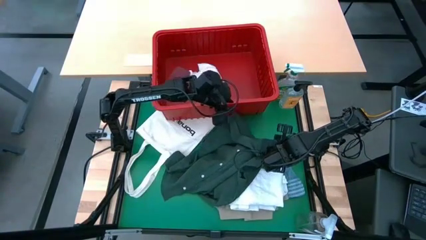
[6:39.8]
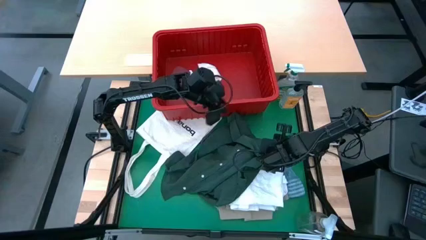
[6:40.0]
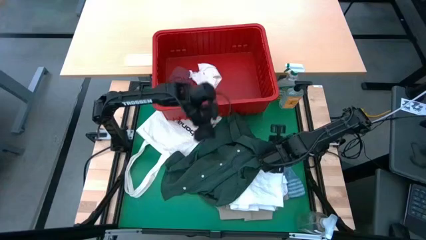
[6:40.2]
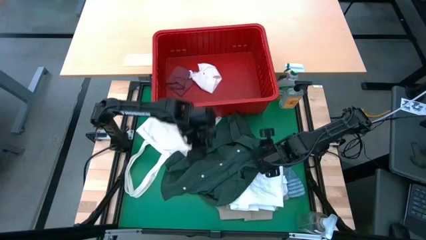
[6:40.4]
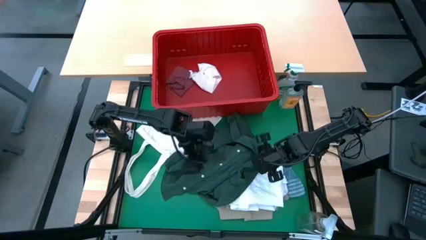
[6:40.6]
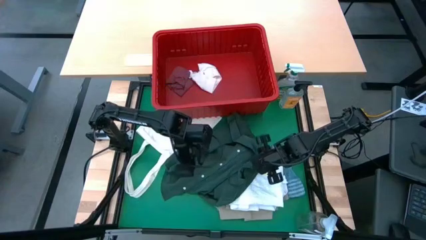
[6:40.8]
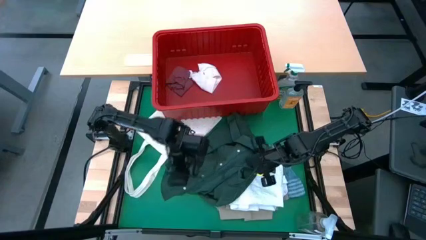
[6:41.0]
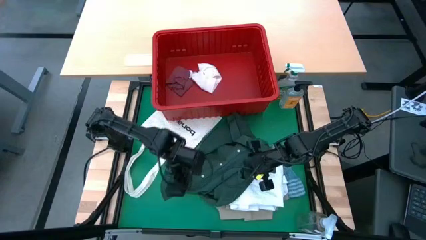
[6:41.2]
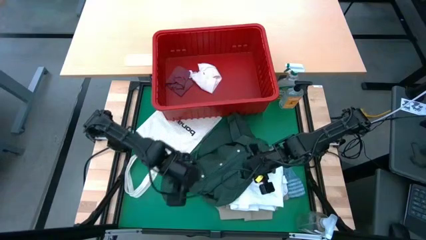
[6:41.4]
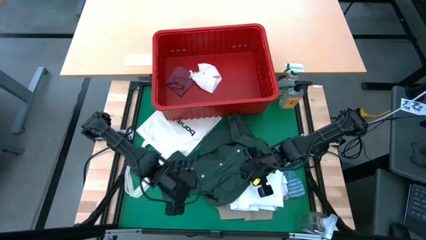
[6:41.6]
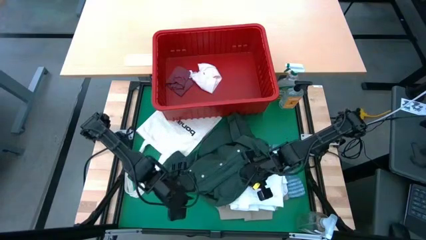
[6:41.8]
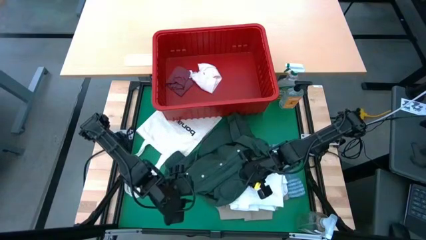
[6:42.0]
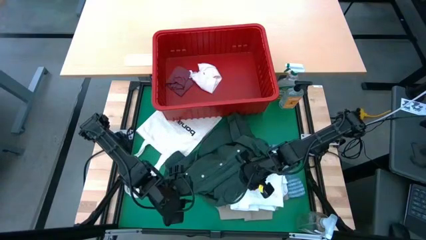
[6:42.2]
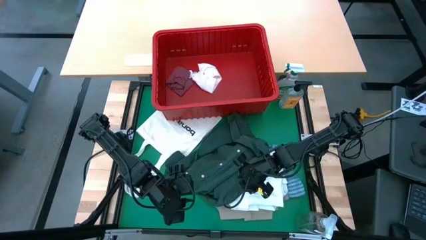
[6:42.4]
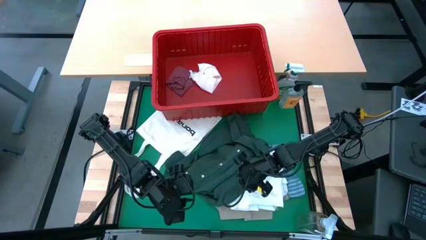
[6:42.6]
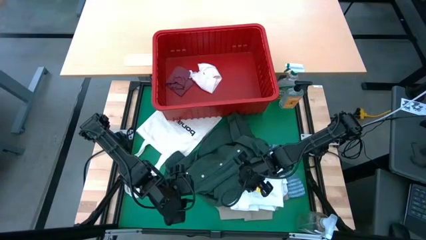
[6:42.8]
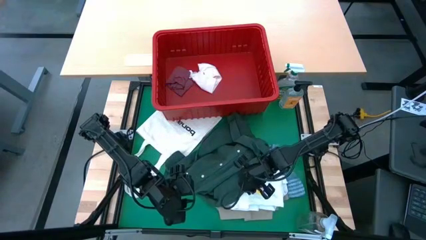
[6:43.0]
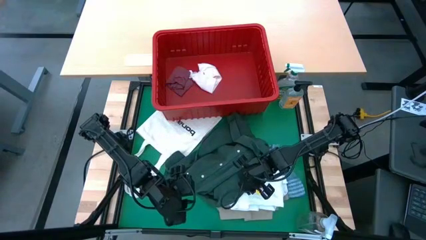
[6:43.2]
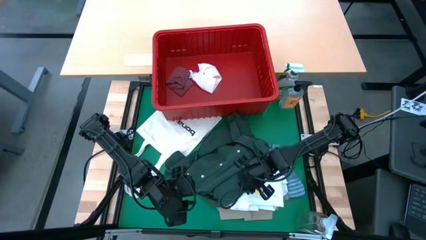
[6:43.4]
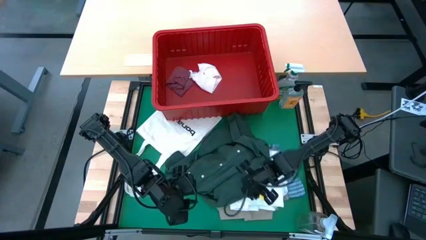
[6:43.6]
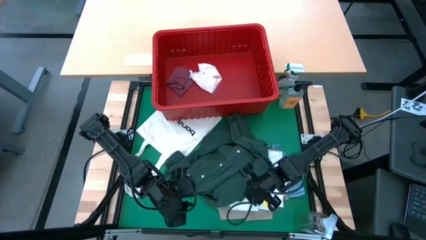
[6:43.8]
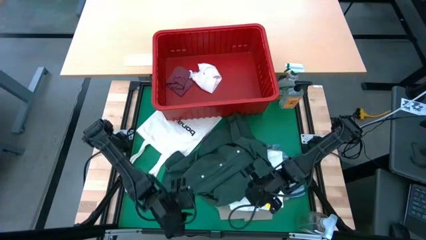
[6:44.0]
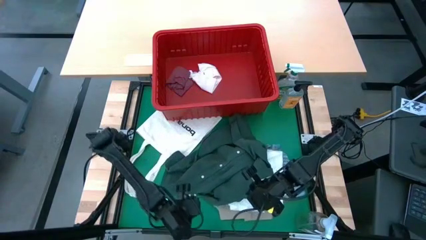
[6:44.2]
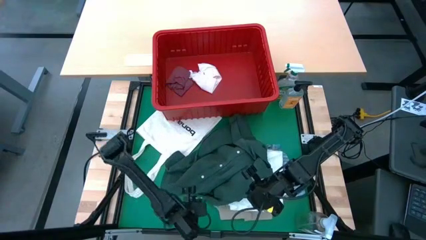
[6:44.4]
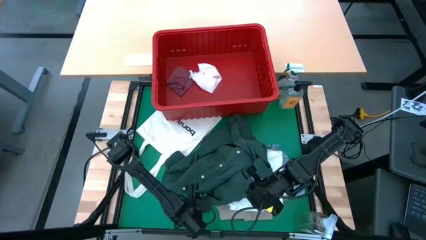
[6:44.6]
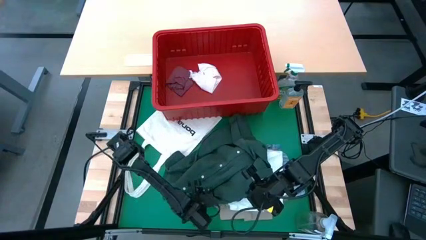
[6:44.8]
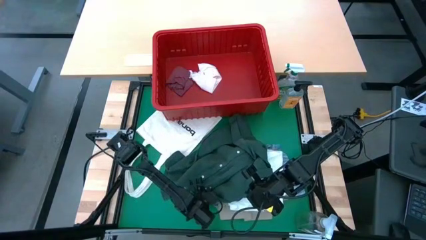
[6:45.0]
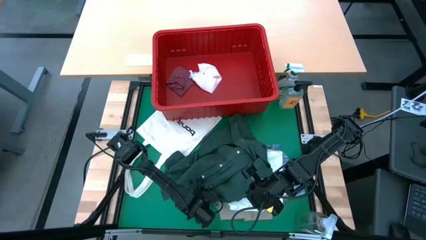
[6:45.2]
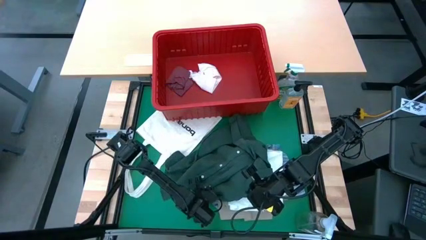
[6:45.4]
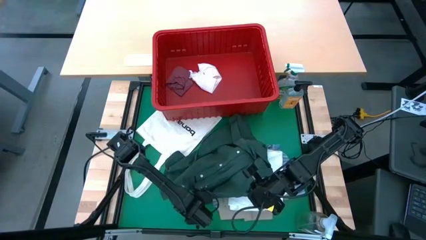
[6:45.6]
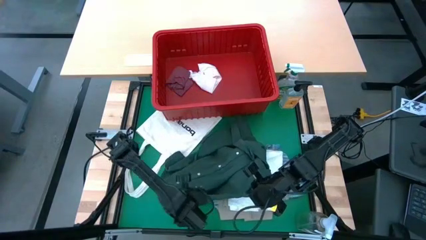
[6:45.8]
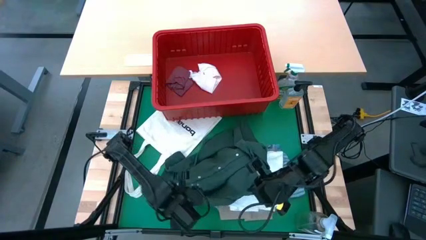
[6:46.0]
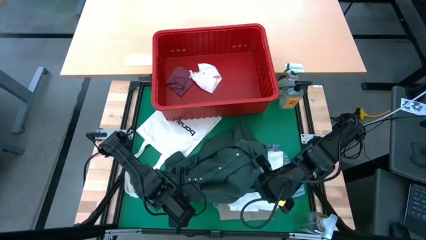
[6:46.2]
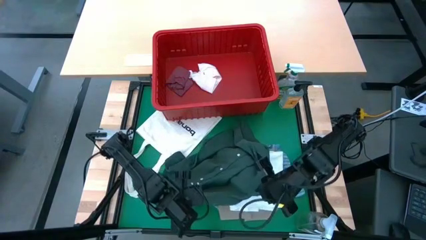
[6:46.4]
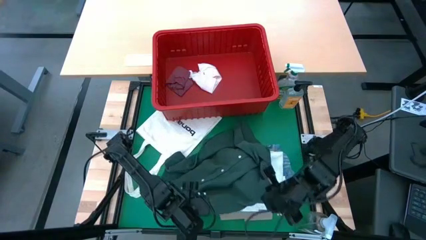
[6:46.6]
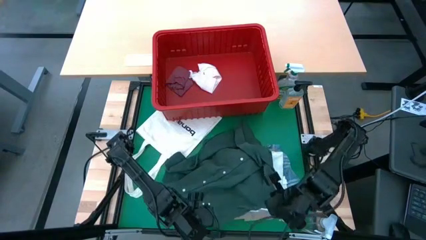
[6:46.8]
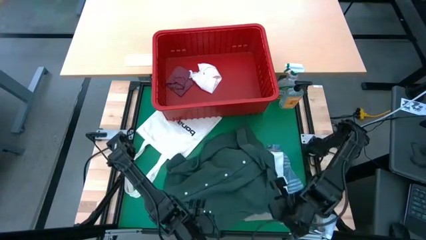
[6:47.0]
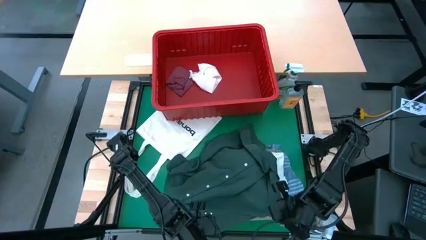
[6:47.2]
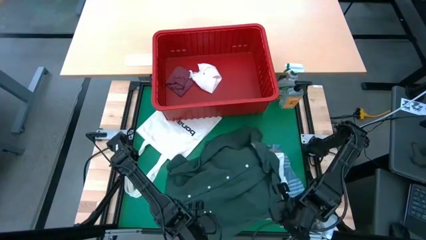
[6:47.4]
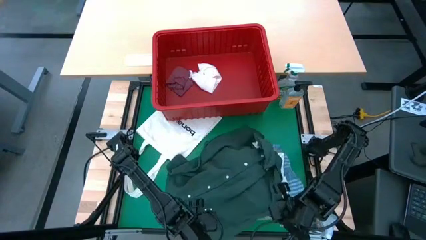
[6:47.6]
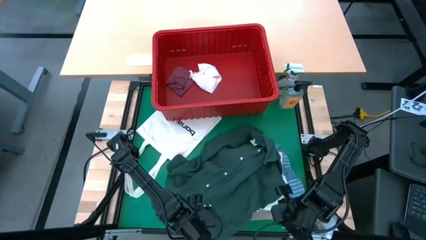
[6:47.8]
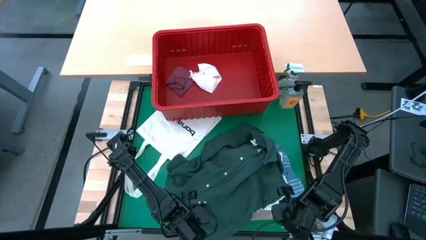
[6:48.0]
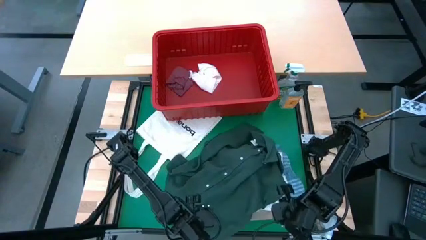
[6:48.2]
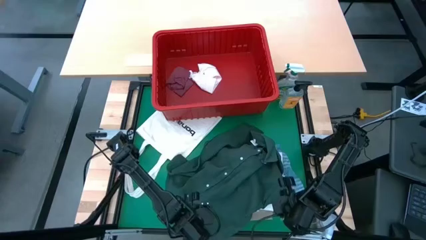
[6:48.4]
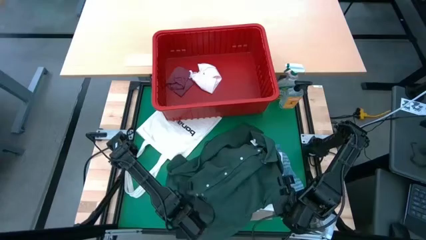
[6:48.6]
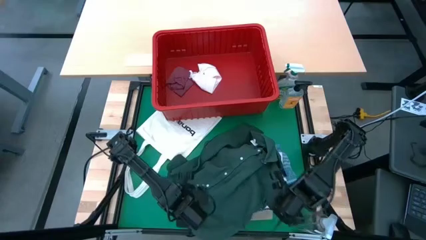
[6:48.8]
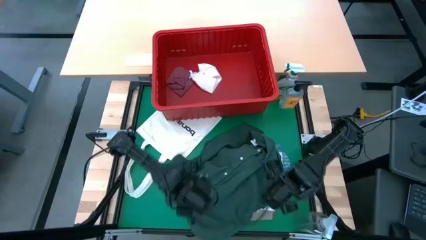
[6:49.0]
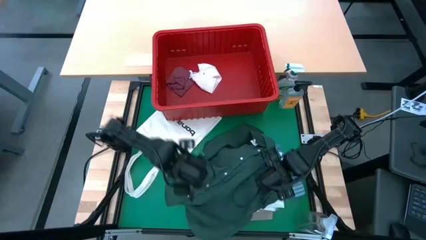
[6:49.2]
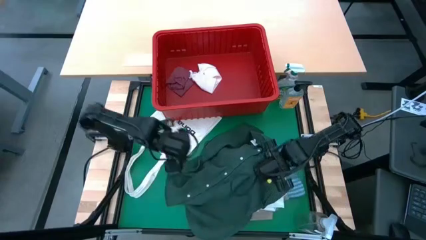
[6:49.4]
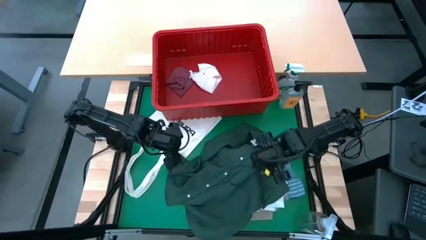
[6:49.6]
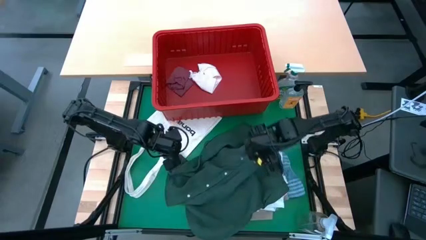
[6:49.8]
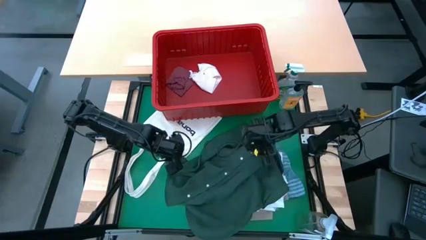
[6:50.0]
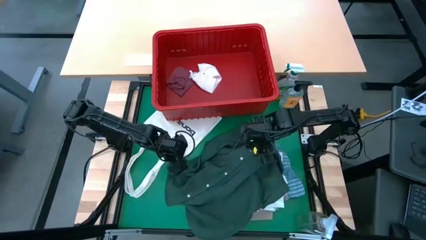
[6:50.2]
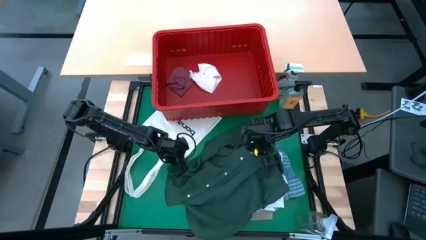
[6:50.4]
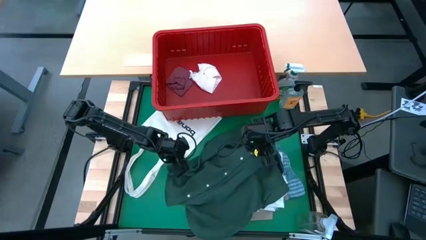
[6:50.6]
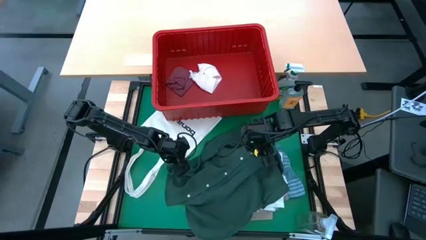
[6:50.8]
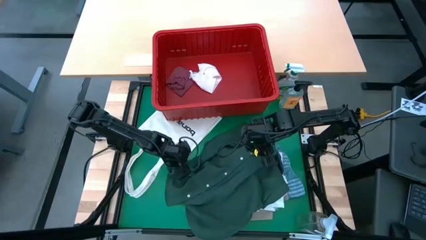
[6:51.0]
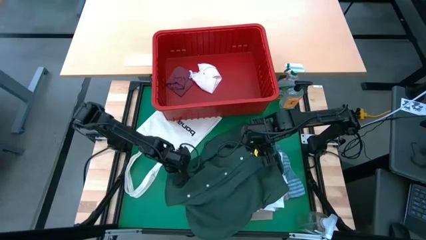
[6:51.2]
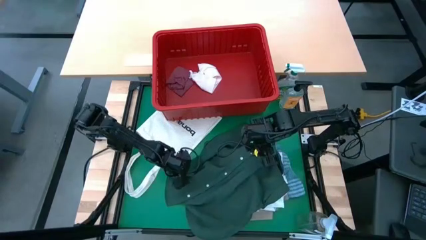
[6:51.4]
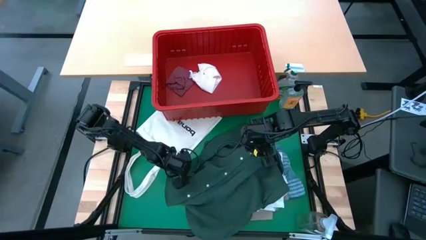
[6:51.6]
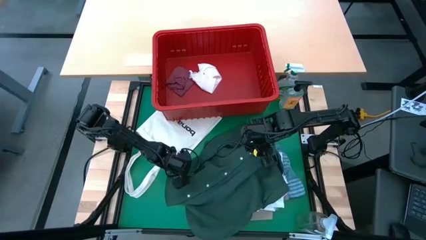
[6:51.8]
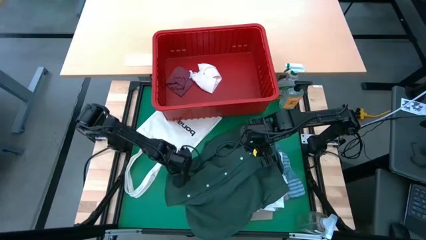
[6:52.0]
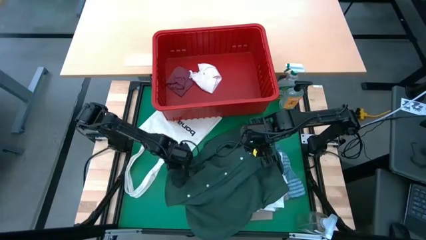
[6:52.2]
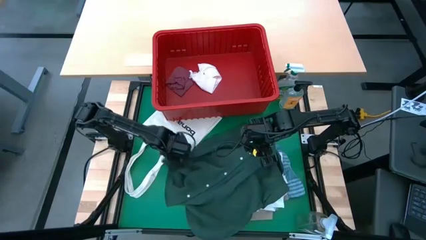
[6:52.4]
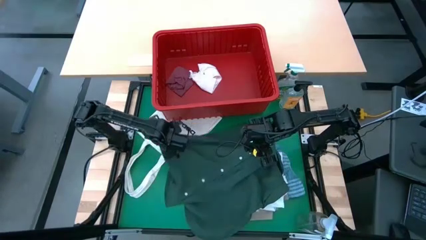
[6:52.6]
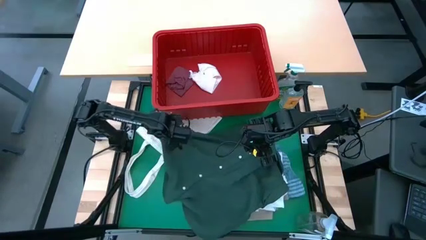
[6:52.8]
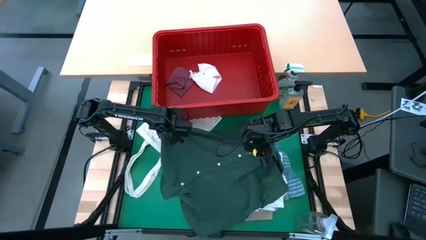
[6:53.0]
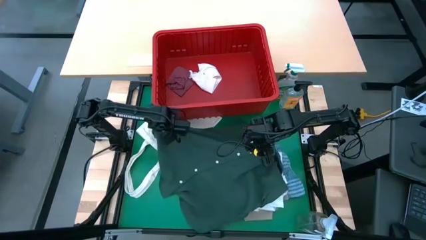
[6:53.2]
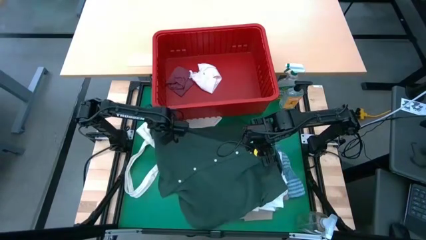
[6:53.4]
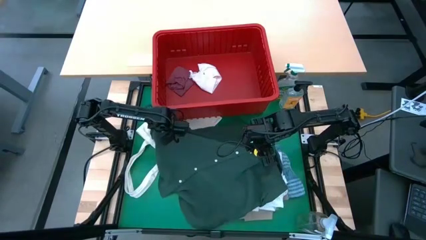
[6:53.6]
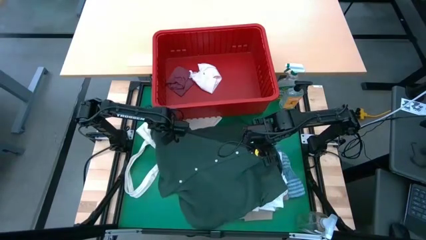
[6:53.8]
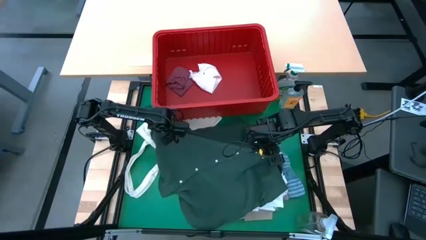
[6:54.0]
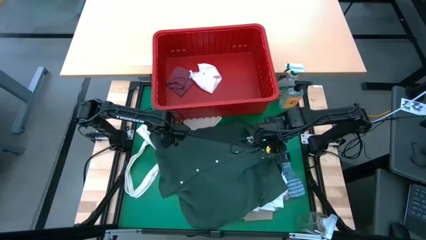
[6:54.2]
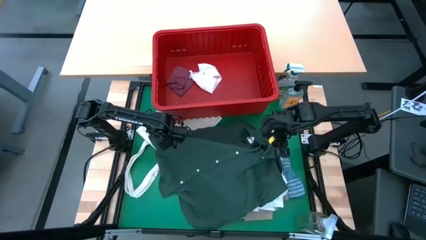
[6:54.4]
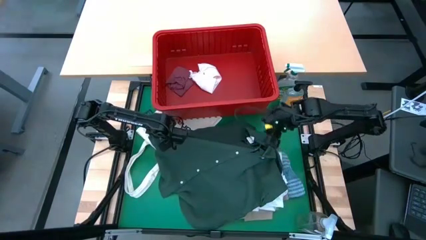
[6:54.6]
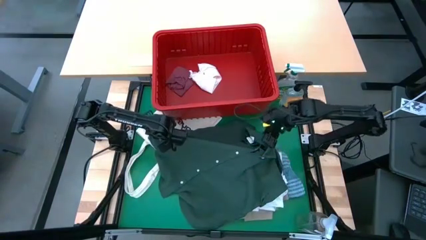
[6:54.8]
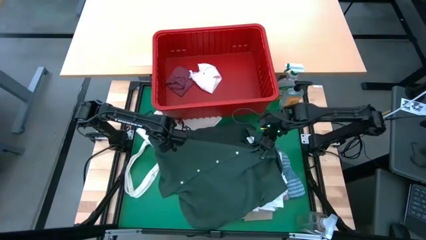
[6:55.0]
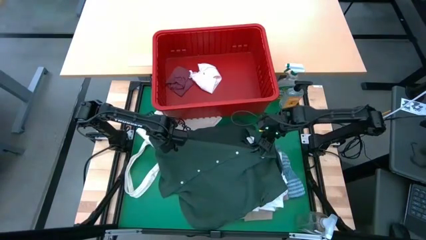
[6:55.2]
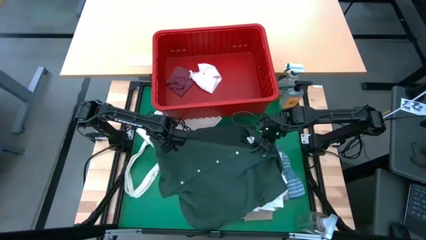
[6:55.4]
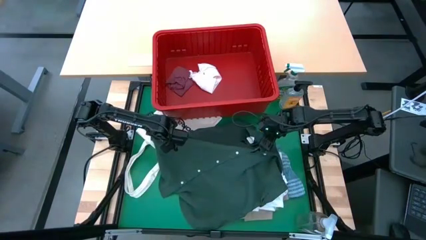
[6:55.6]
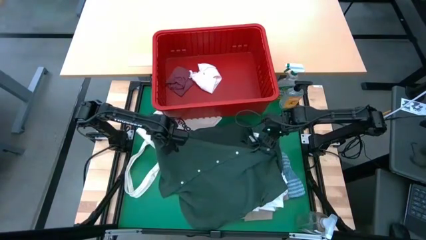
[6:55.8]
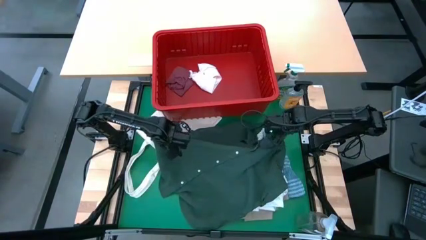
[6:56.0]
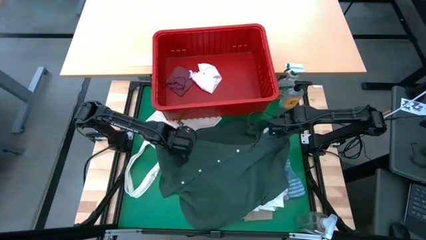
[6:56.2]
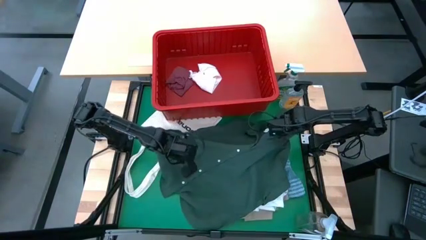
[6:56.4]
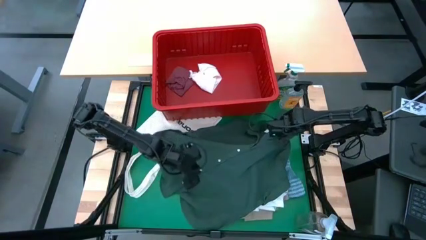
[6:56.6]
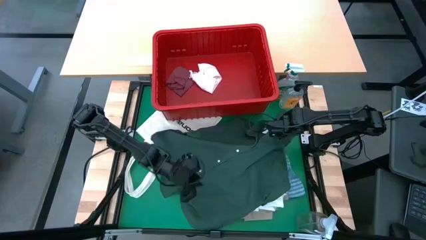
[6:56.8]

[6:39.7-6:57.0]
Task: Fold Laundry from Bin
Fold the green shirt
